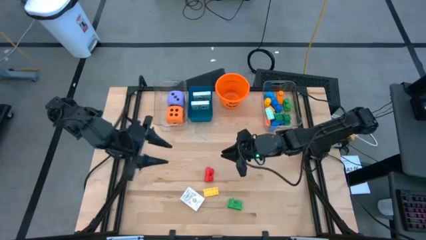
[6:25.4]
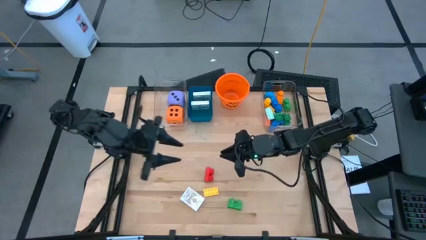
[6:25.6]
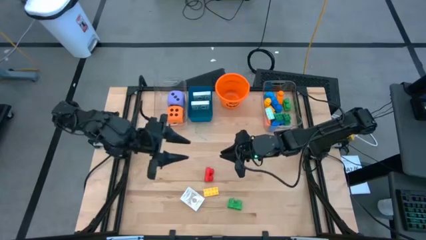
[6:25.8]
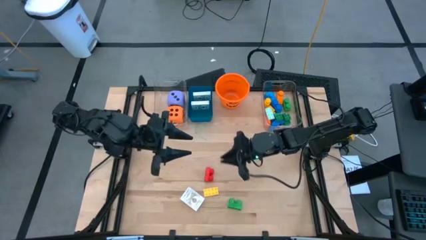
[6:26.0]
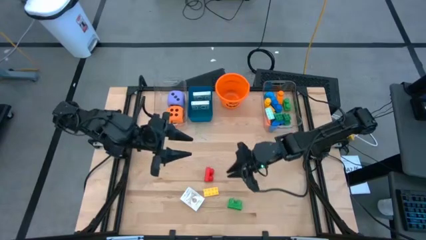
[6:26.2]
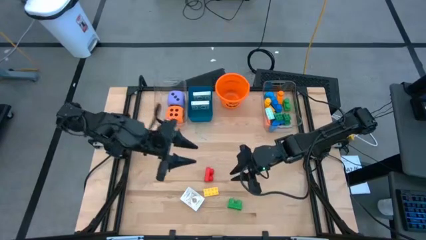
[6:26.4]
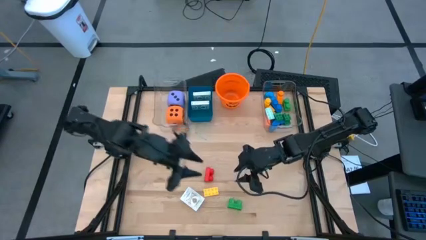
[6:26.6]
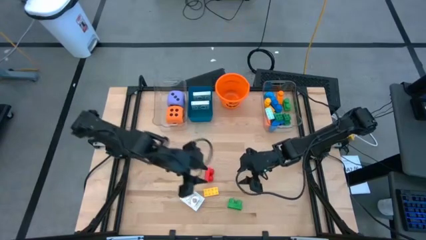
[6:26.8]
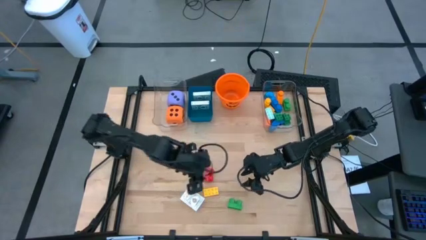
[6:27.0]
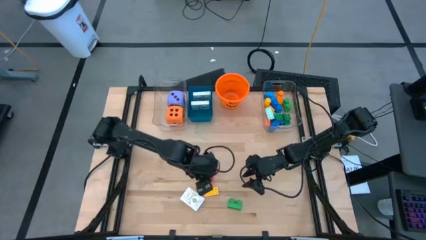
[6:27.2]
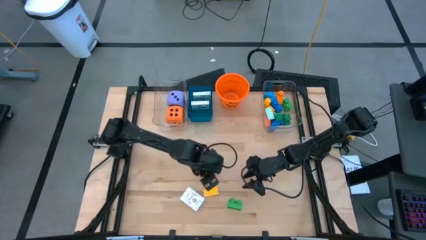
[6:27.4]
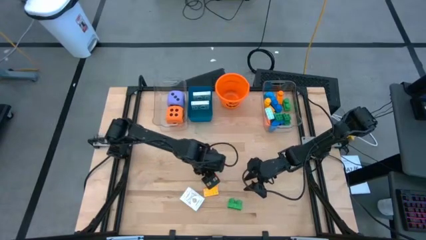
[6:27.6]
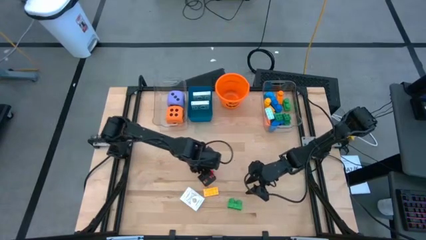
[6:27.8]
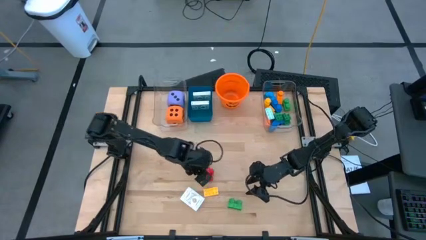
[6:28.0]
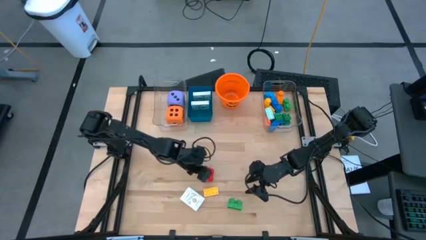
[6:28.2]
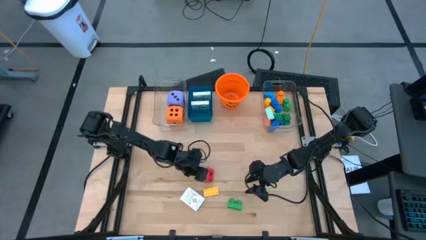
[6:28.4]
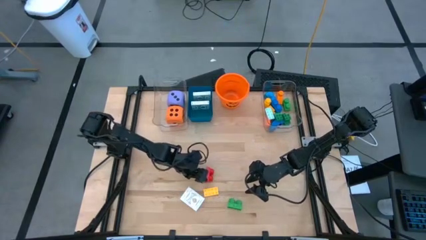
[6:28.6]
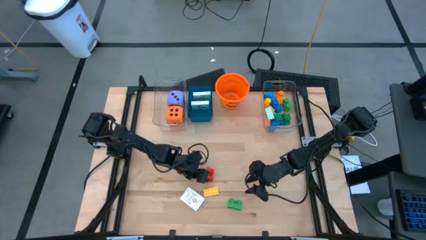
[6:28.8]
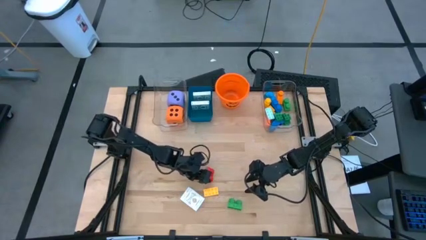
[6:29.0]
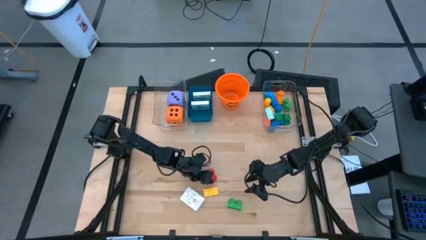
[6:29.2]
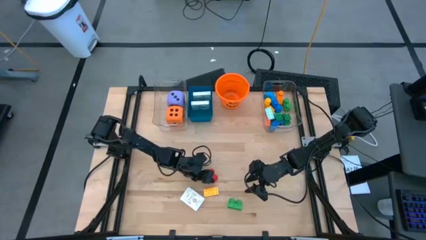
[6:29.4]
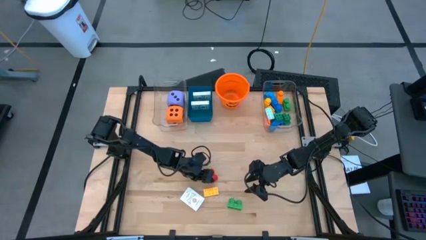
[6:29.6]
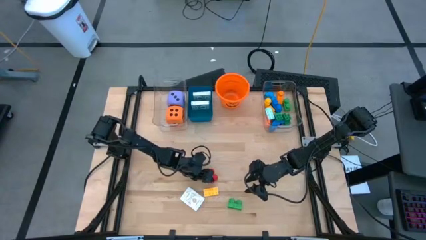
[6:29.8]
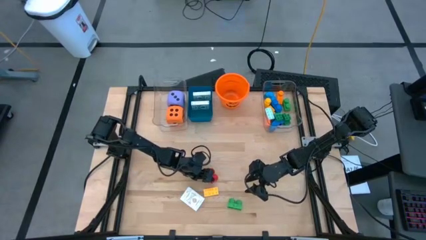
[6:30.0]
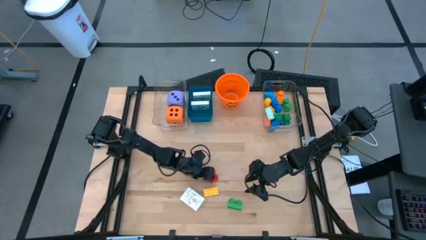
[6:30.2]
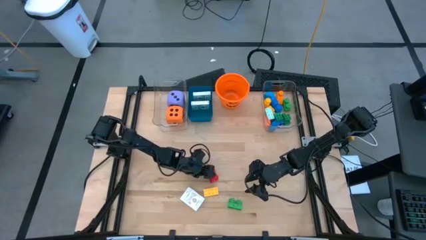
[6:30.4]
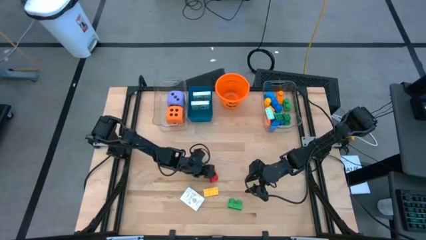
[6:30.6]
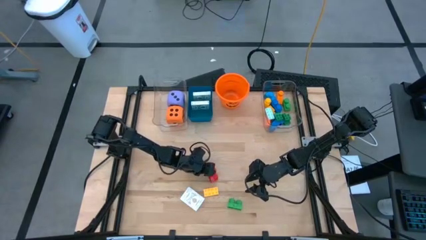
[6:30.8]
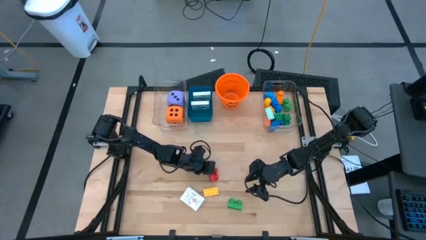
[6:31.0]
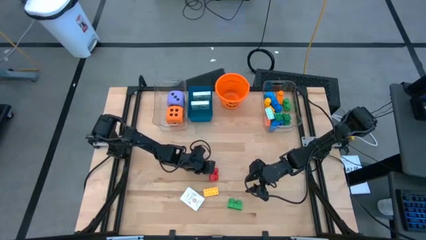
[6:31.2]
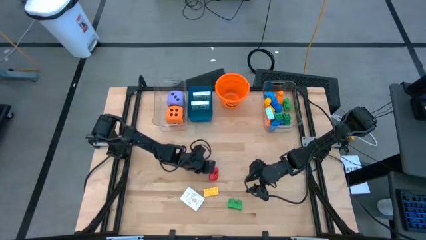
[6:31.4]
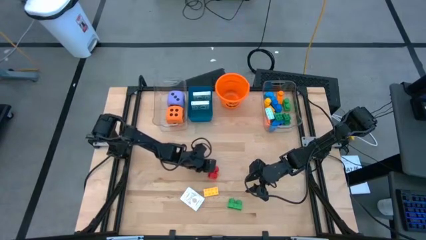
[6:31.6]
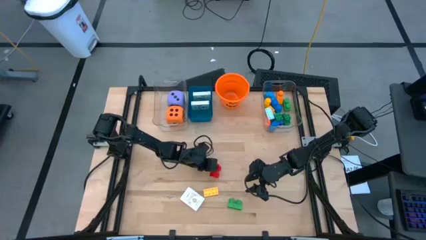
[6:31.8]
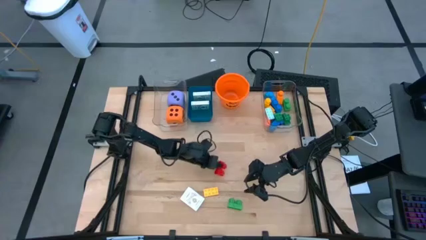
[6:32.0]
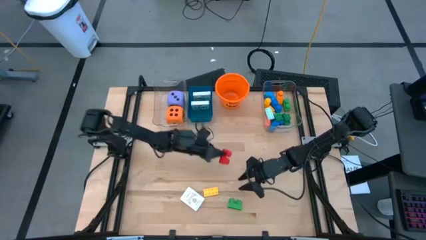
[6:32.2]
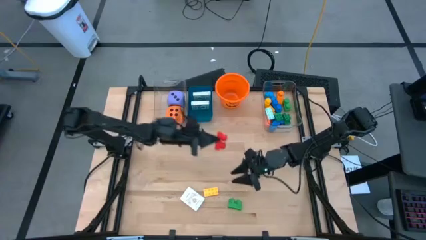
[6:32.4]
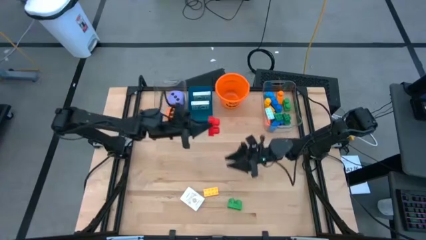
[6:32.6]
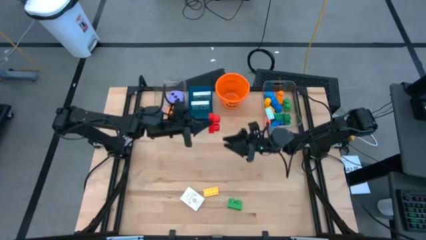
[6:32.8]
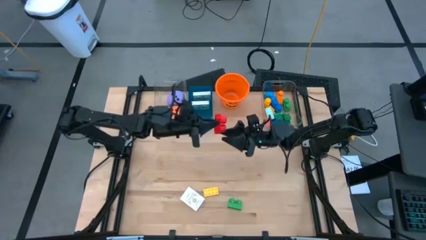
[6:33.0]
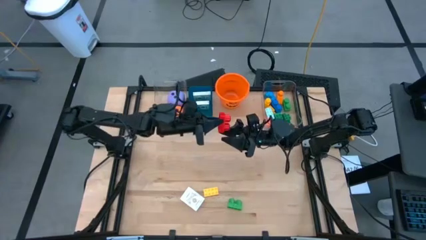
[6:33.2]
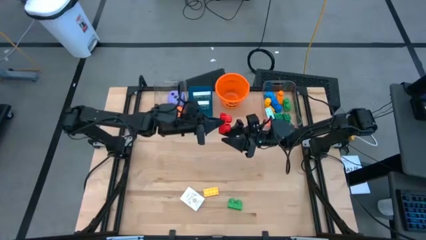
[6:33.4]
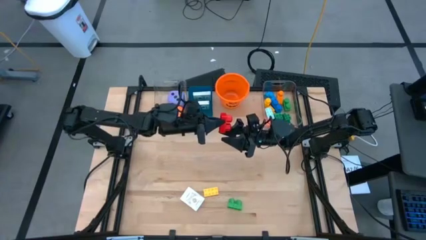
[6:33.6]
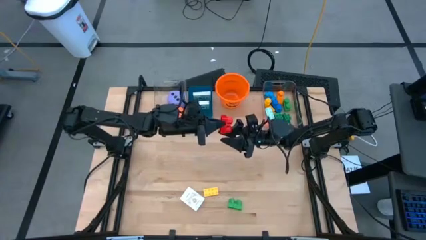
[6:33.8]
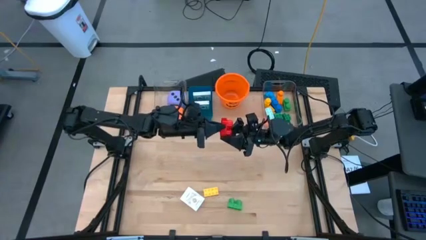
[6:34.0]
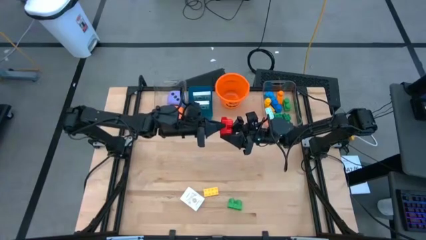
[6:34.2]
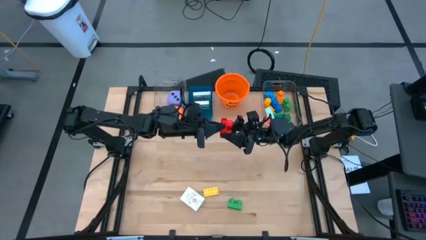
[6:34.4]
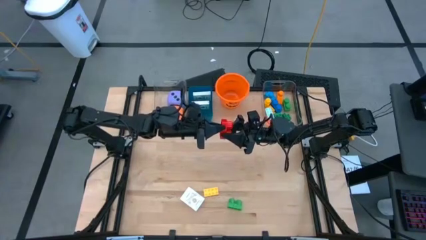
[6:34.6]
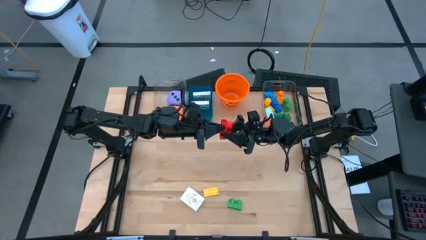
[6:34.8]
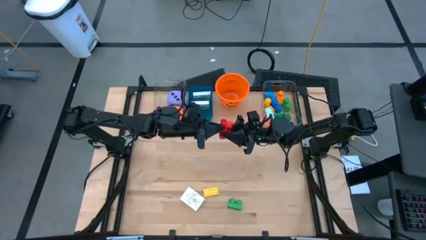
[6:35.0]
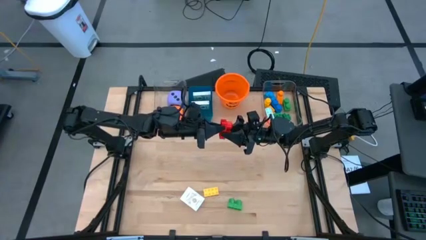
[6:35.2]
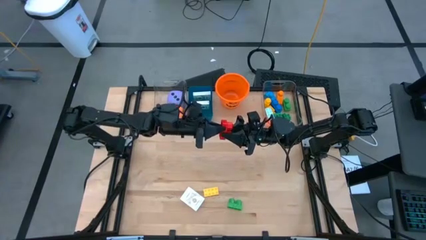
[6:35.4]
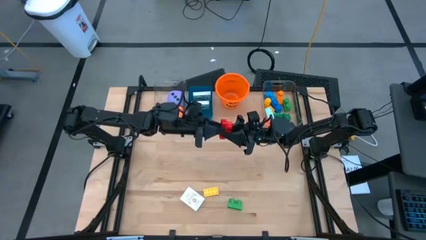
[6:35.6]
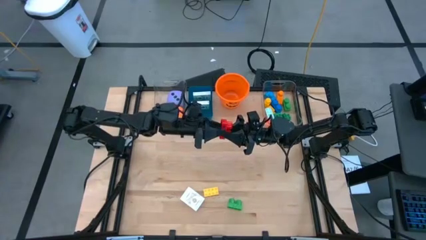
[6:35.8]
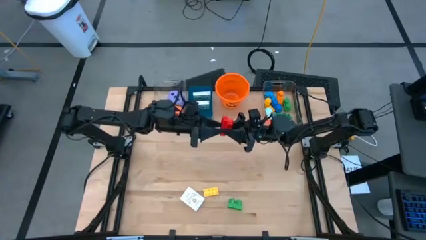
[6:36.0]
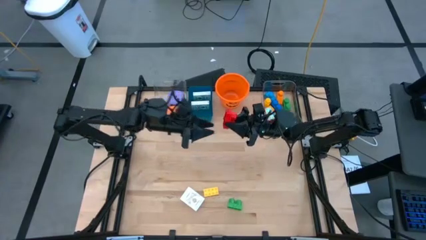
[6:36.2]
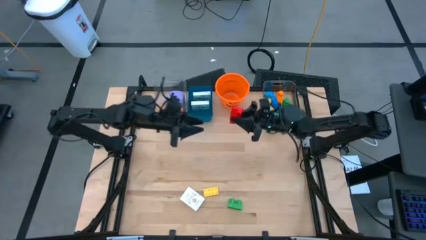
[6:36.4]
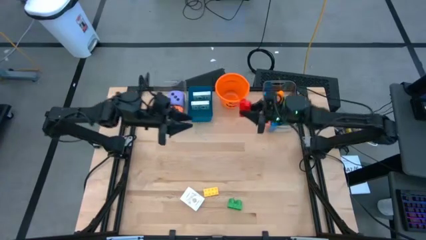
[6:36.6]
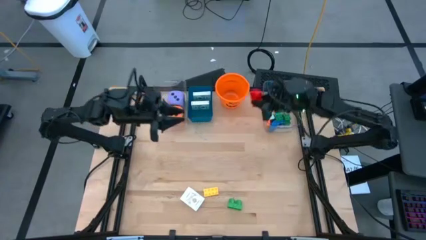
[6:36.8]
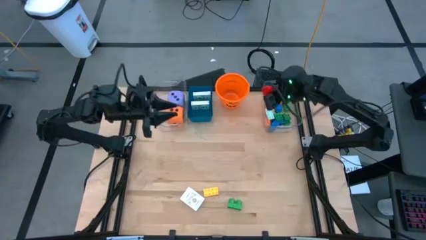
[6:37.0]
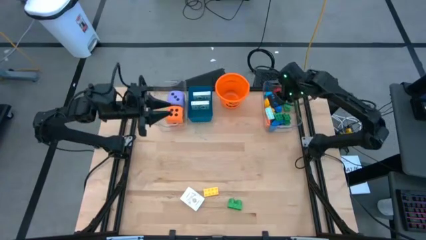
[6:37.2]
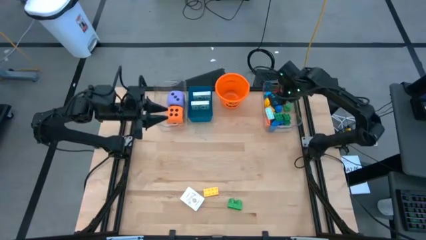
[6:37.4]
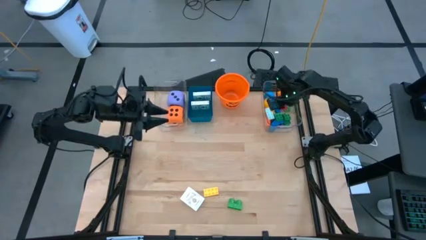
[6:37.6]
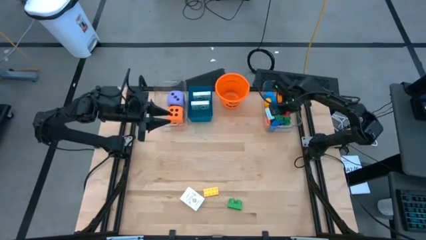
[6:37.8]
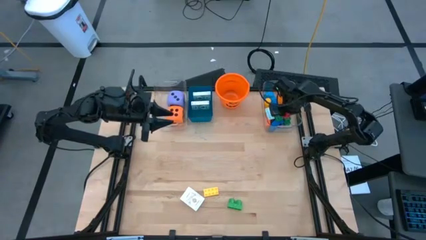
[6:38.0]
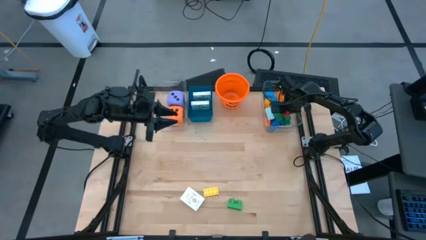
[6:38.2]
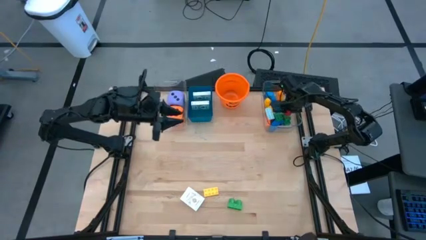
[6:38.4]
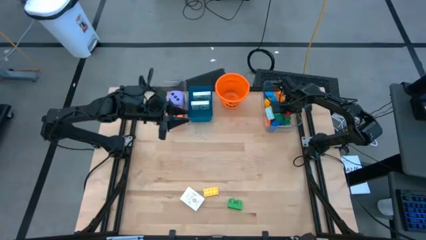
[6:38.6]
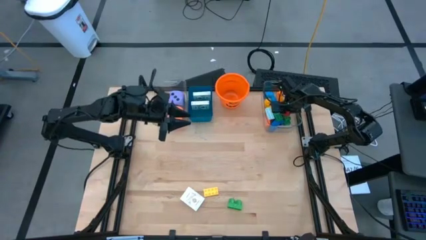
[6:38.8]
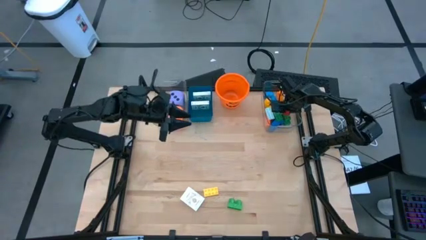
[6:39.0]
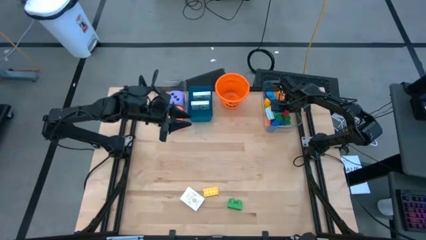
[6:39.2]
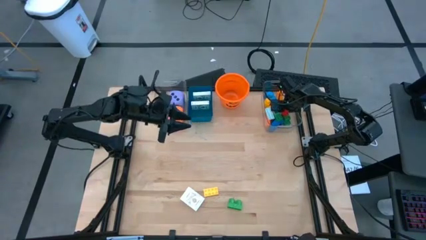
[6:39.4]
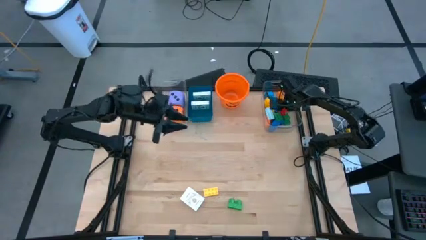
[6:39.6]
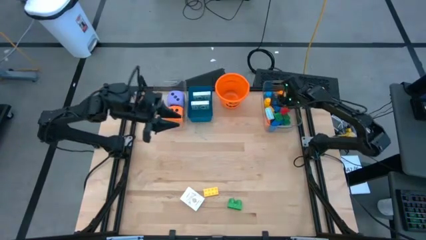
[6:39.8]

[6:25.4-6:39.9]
Task: Pick & Place Toys
Put the red game piece into the right transparent bin
